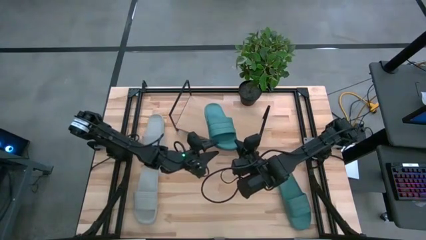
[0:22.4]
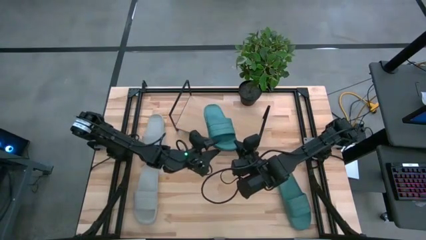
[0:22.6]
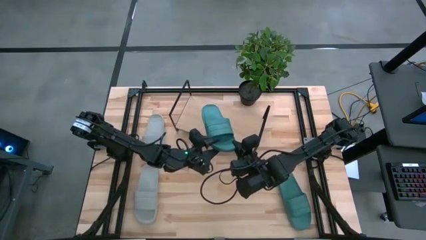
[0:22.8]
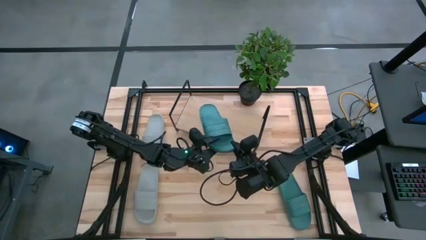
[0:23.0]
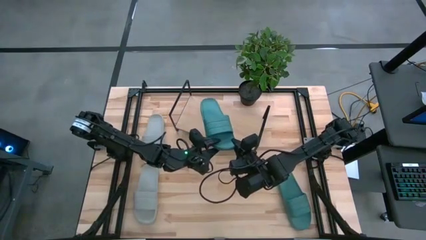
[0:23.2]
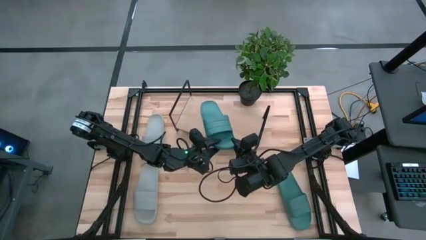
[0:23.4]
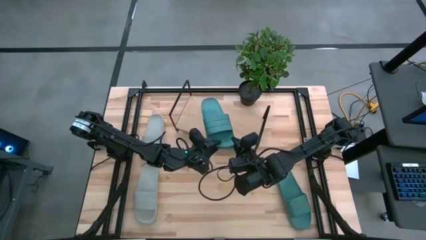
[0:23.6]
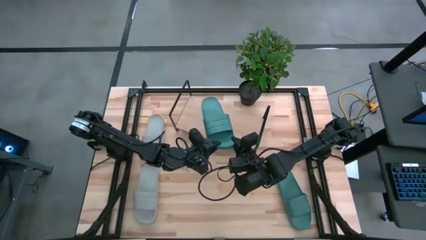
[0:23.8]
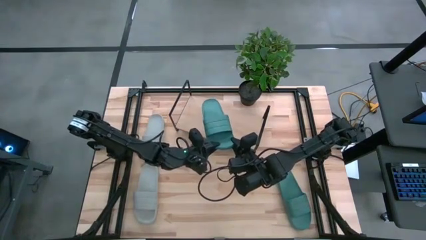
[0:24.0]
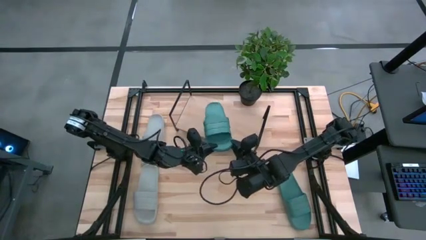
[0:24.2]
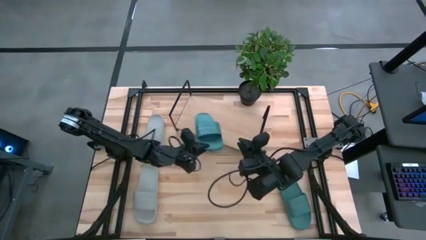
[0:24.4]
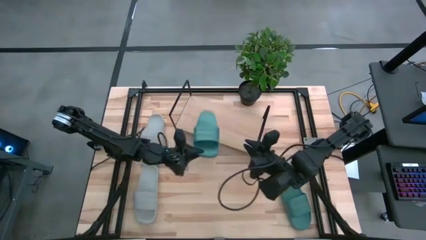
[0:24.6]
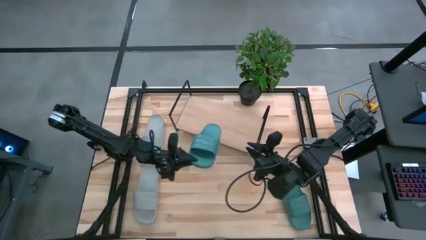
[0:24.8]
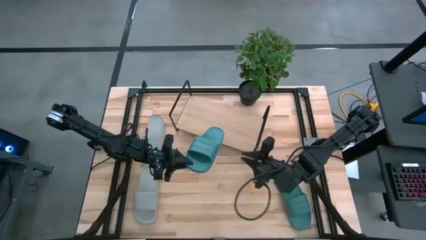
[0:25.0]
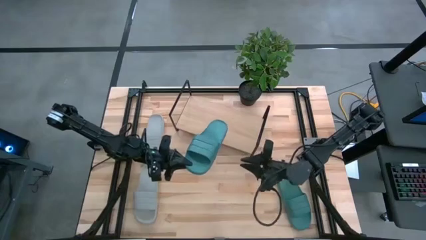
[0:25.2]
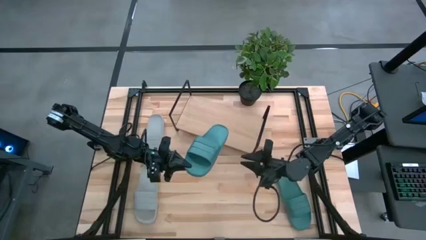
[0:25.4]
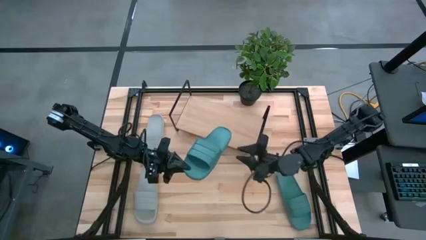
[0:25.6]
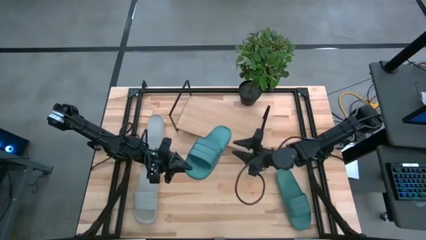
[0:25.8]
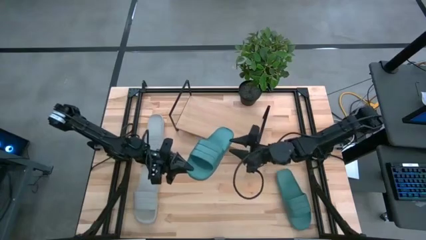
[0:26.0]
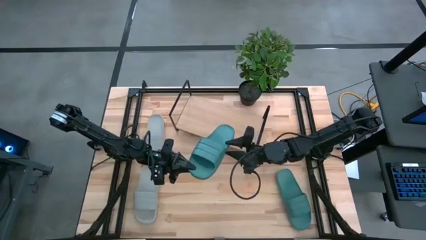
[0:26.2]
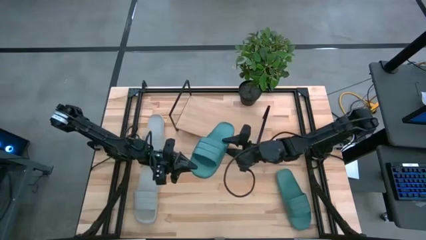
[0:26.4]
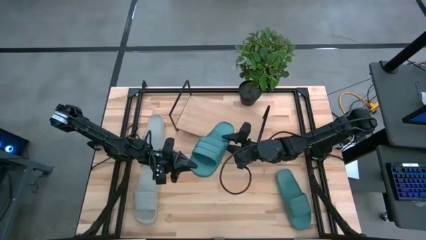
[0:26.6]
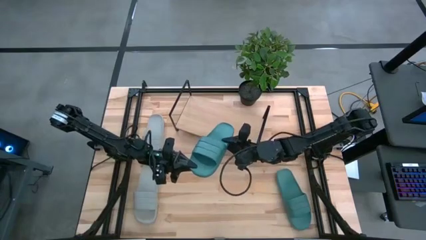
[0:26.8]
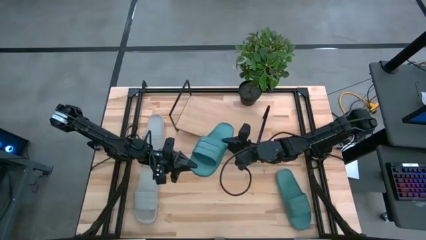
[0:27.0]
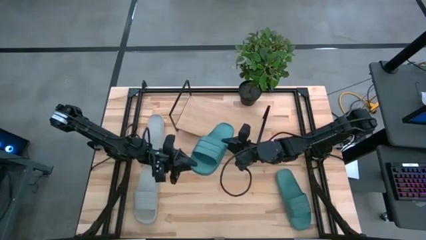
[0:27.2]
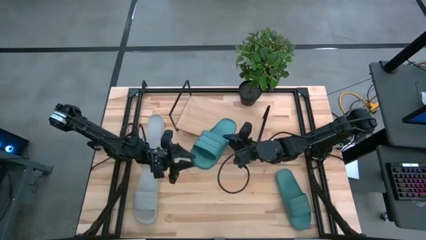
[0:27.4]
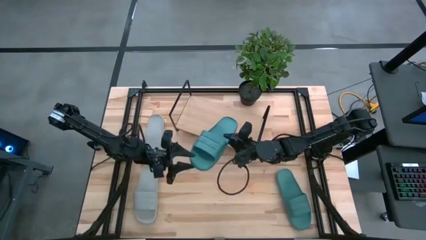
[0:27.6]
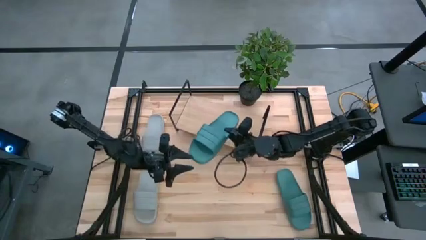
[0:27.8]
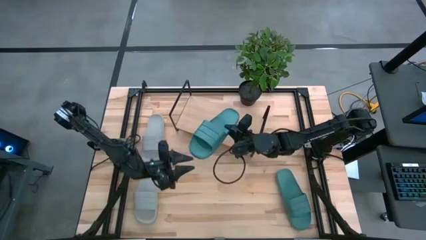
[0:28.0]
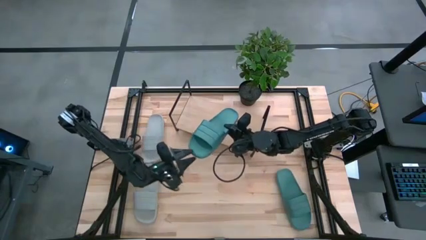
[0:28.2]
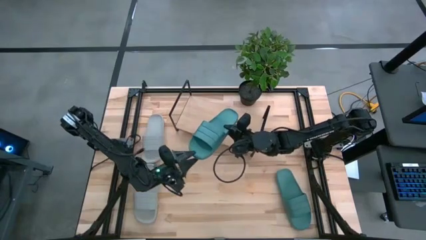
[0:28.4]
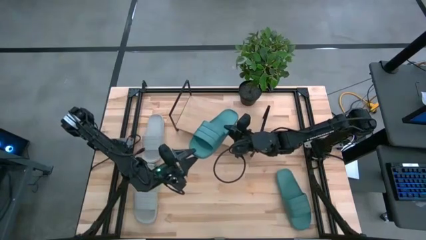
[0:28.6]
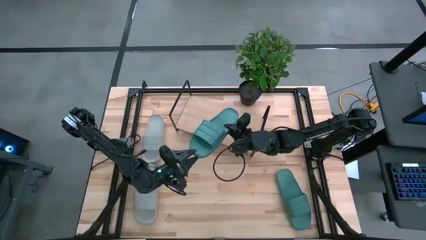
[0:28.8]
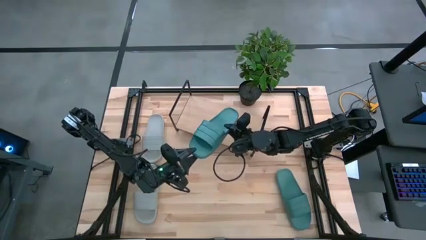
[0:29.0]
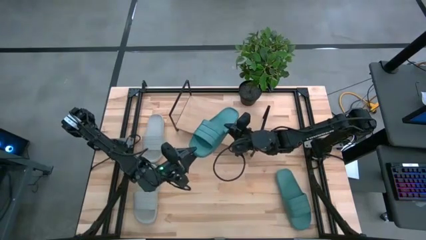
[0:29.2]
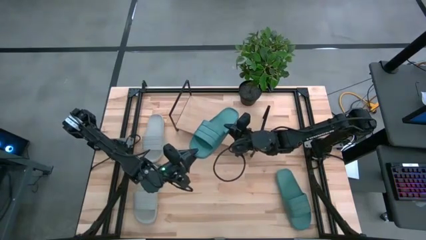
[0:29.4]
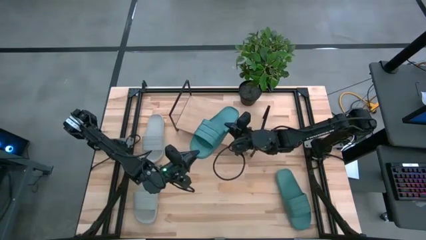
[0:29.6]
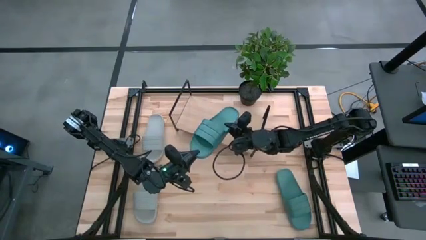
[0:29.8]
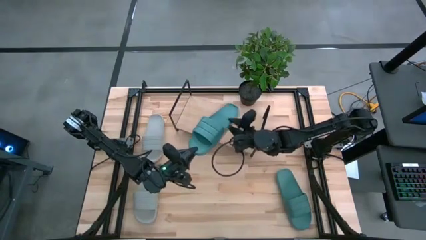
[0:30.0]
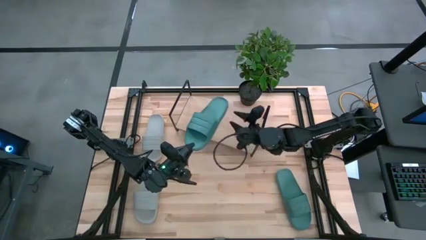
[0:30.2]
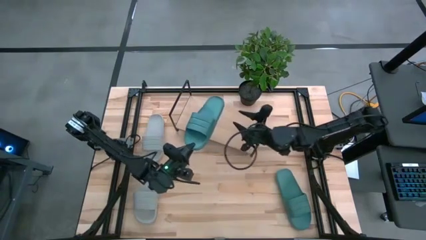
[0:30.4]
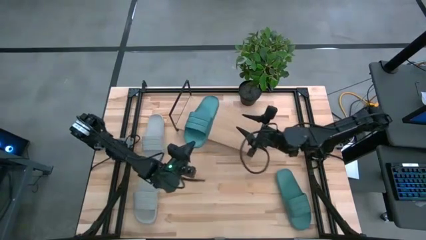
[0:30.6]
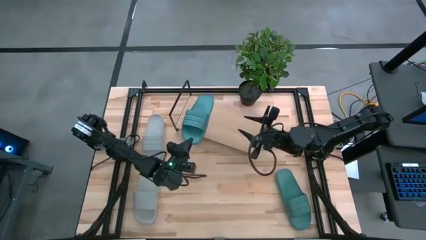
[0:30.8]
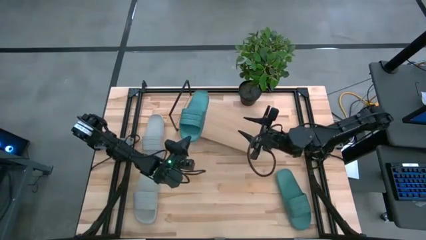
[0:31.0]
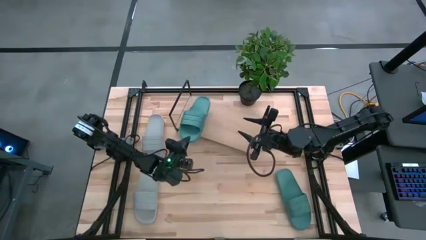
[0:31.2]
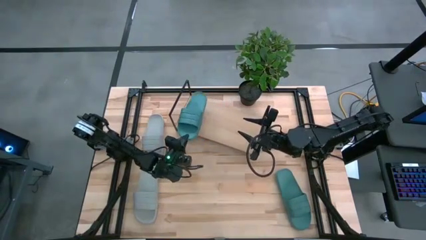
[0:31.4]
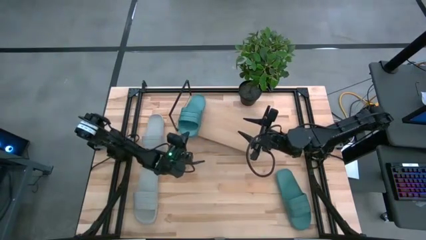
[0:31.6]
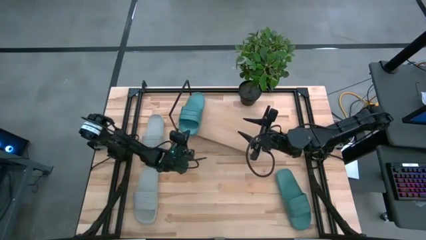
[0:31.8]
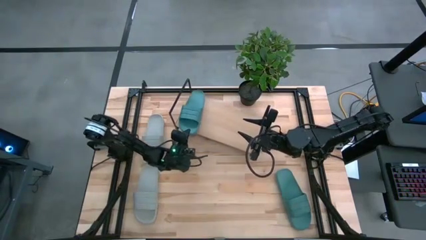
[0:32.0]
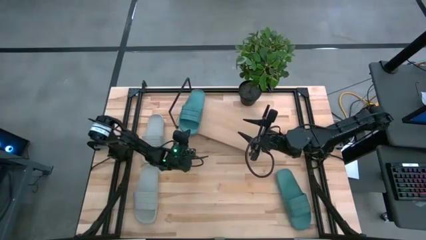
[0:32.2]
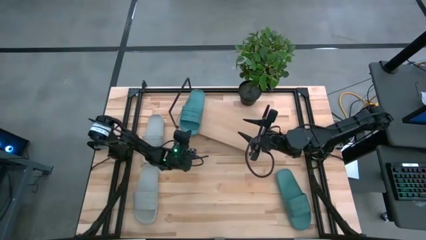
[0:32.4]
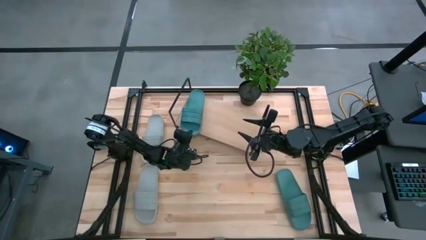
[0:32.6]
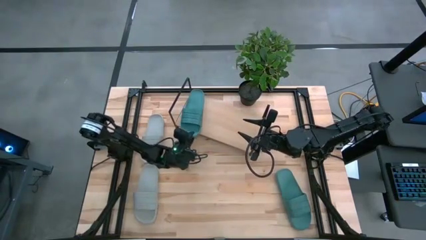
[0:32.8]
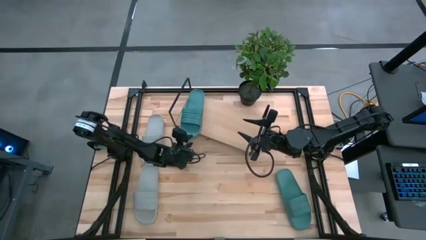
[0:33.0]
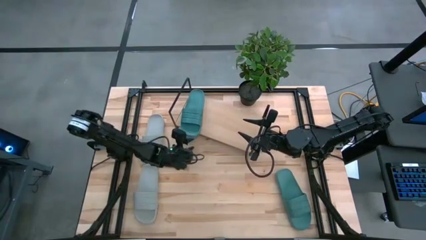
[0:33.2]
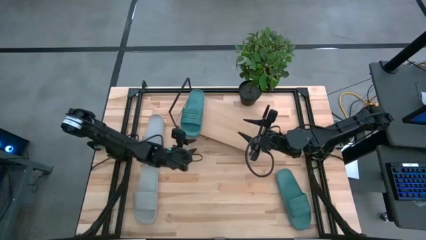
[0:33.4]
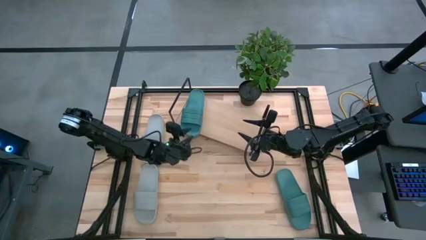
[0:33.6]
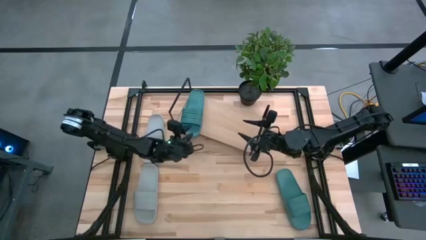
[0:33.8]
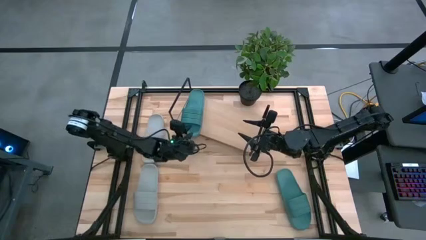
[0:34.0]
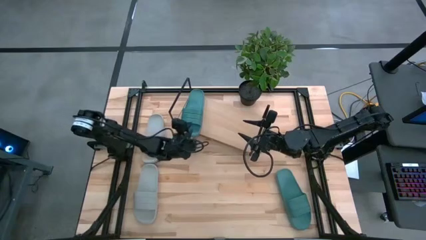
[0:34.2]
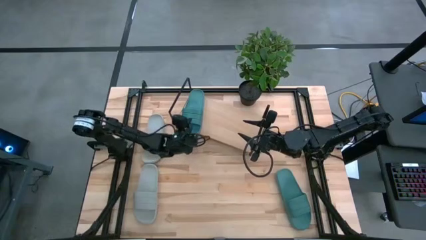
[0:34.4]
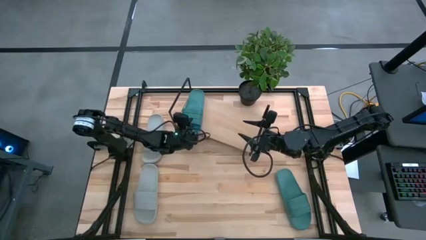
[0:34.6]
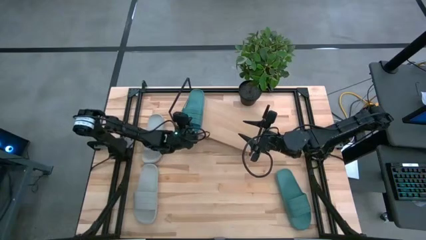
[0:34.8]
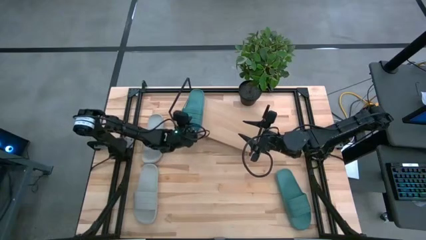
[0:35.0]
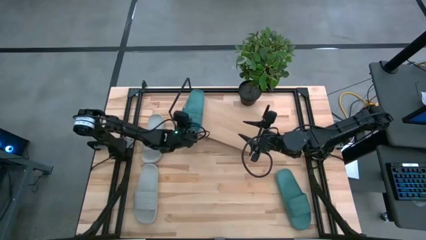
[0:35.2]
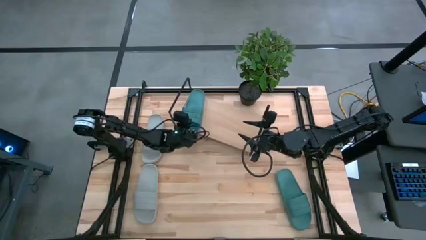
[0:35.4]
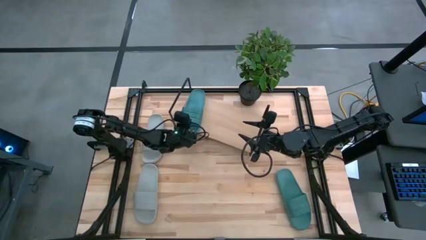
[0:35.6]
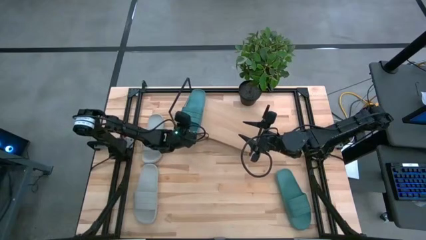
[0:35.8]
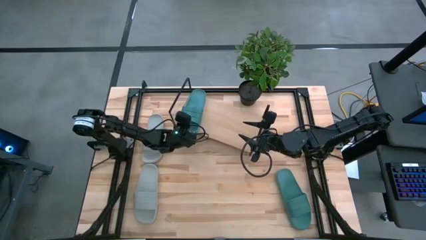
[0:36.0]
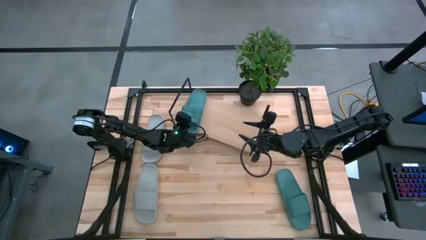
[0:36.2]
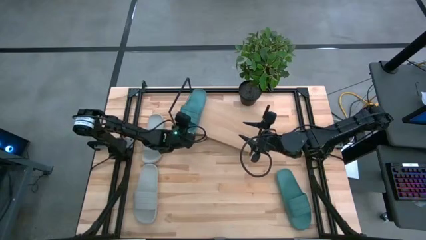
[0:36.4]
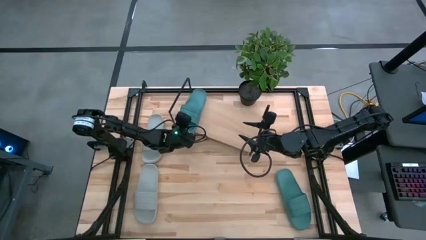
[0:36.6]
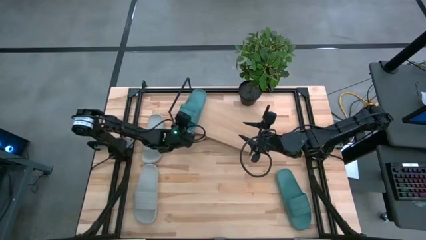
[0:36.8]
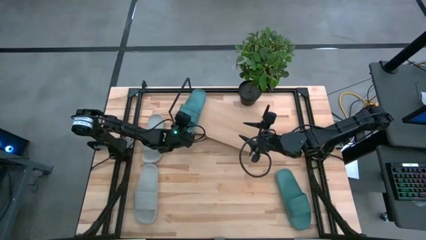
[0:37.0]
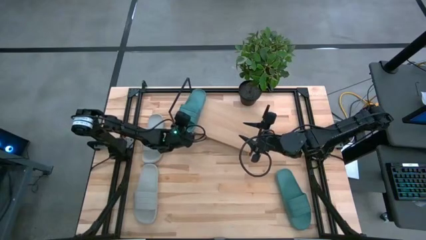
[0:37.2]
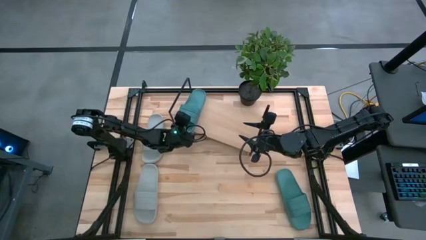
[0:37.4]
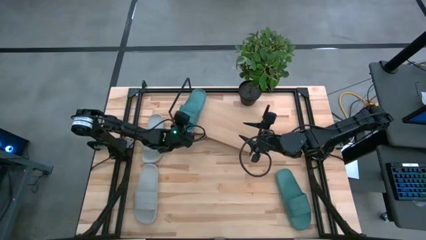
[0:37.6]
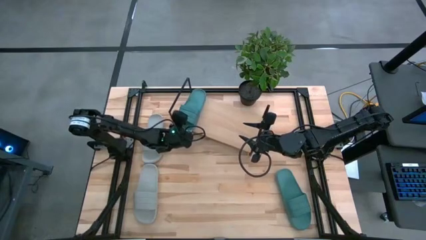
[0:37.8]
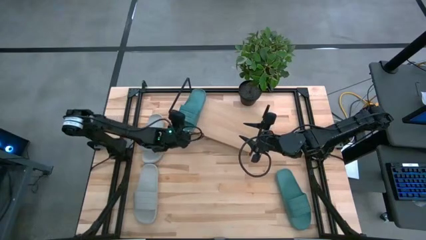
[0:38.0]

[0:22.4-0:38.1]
Task: Pick and place slides into the shelf
Put the top green slipper on the shelf
